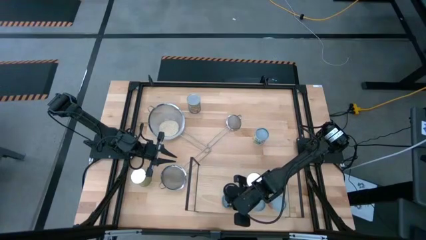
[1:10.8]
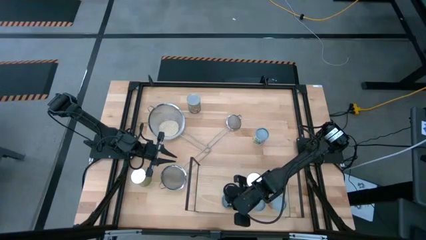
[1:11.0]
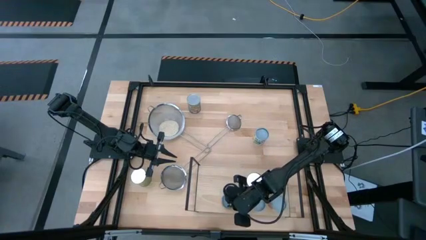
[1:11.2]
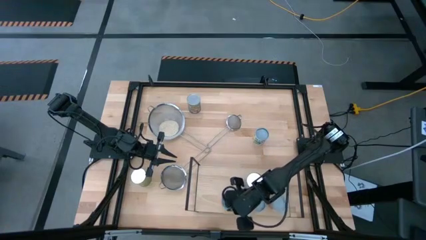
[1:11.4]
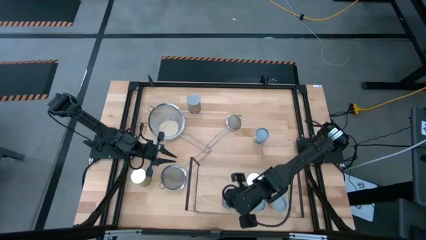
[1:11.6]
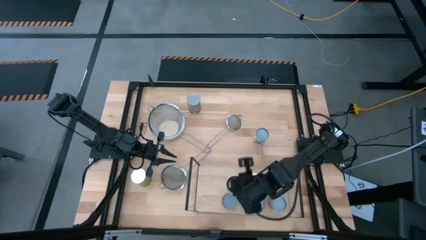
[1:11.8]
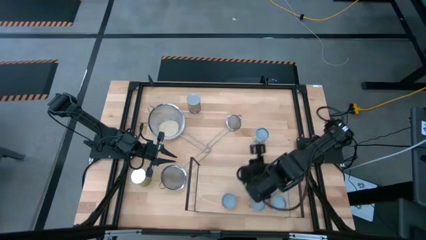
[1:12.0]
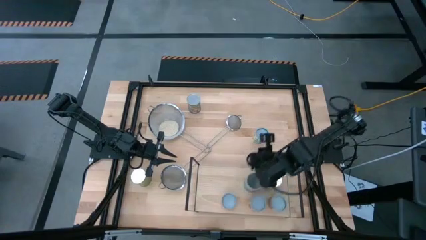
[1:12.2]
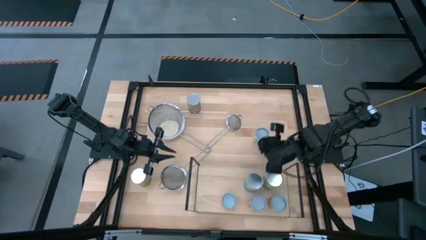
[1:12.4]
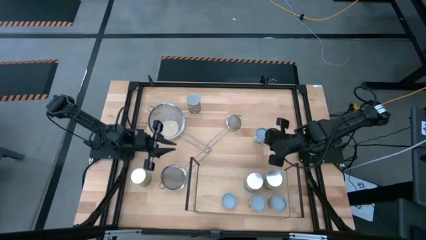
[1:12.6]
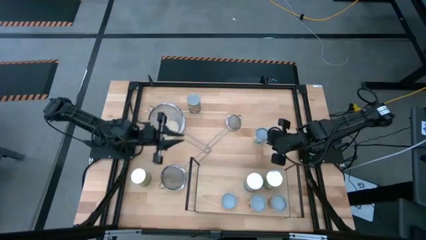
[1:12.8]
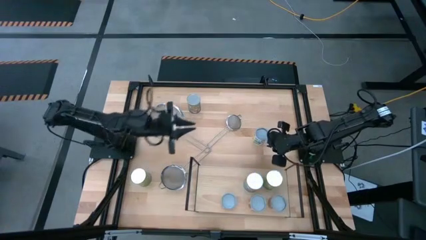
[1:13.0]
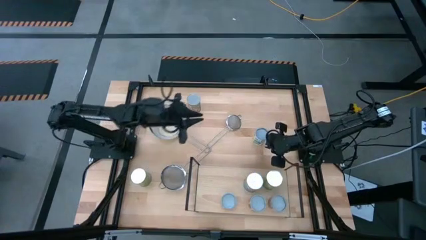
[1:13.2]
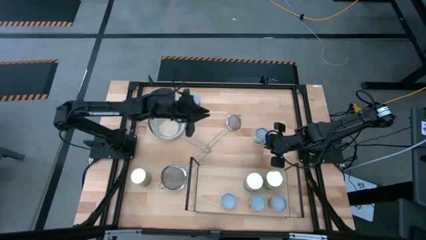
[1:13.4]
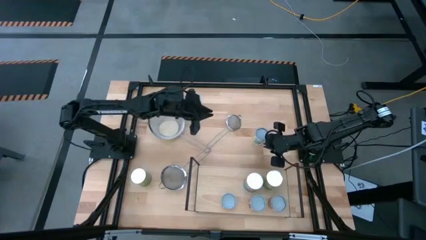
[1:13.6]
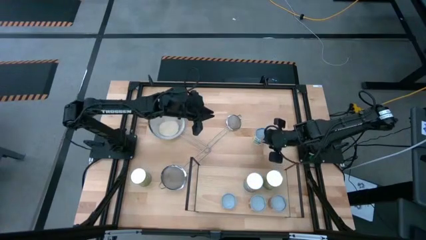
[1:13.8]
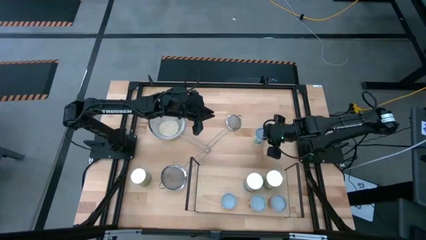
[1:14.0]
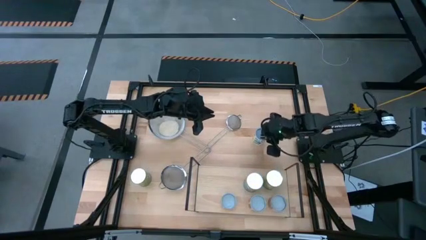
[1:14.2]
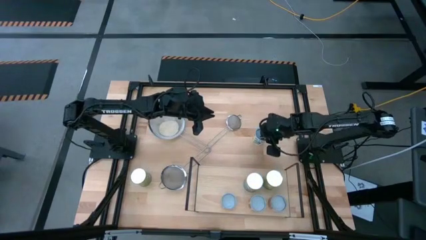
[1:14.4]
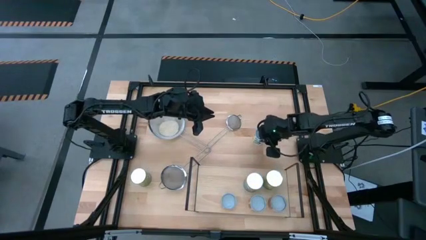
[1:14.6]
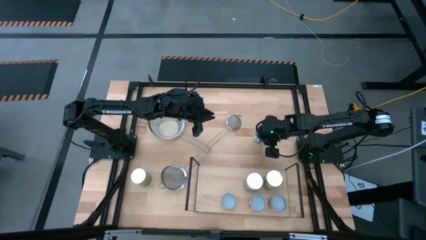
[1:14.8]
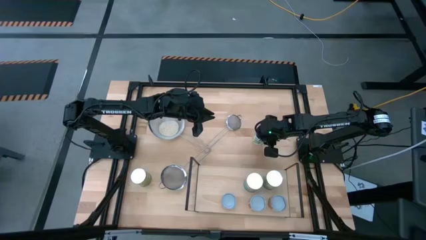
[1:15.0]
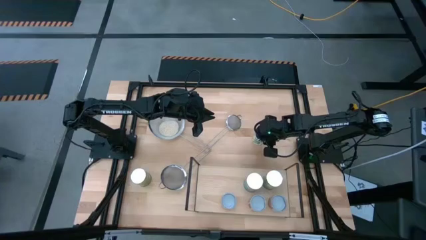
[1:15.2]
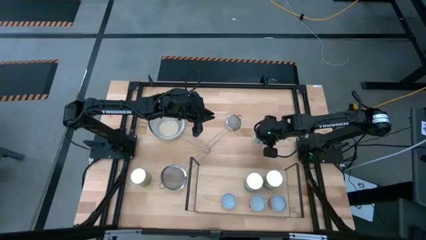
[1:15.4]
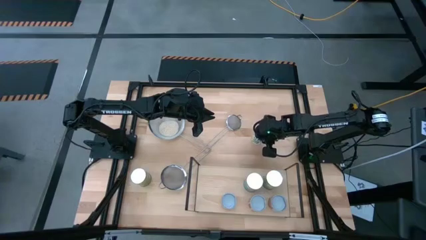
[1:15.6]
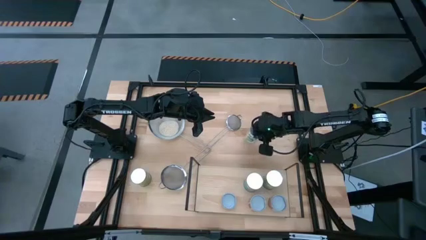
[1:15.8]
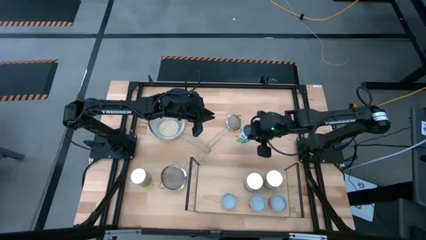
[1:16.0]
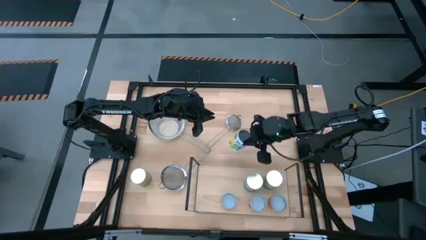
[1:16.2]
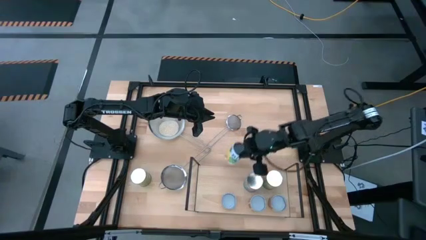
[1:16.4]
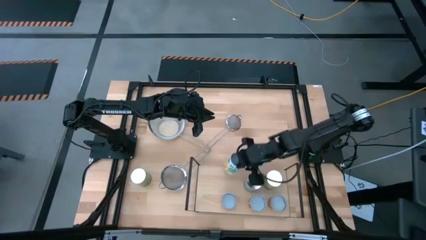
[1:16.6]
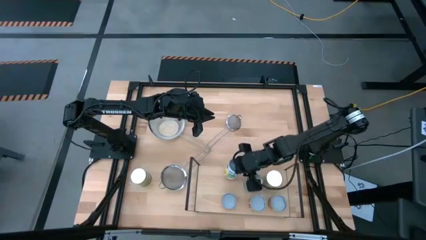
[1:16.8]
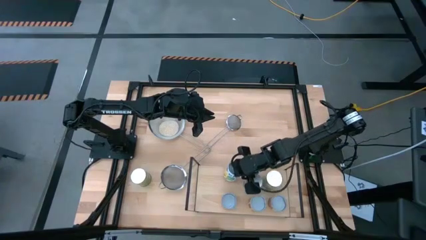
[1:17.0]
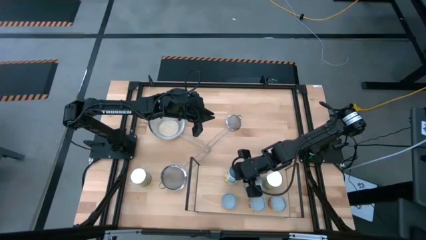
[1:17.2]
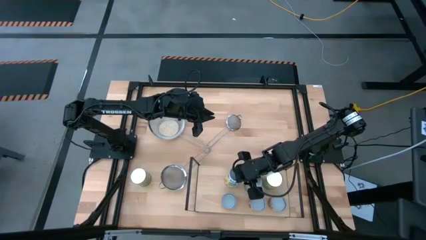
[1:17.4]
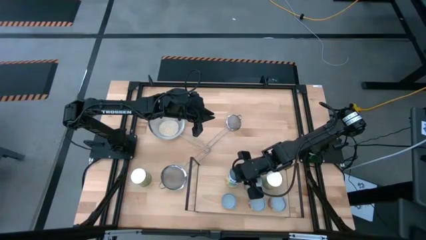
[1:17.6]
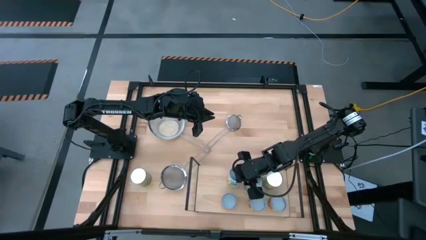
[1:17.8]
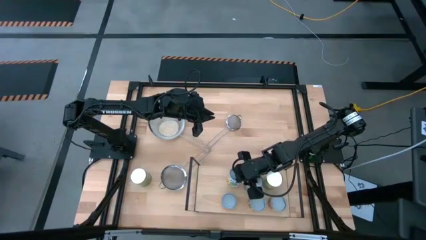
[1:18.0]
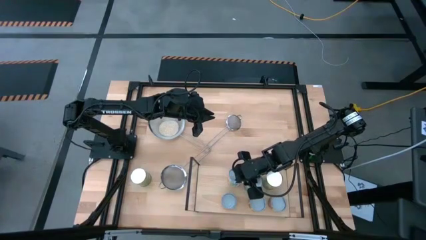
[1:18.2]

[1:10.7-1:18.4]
Task: Pick and place cans onto a shelf
Put the canned mixed fruits on the shelf

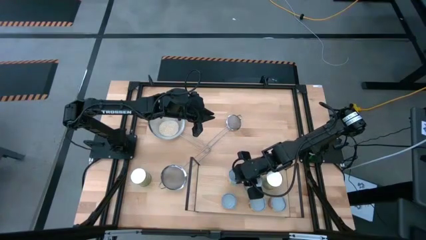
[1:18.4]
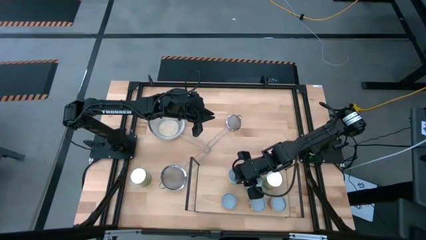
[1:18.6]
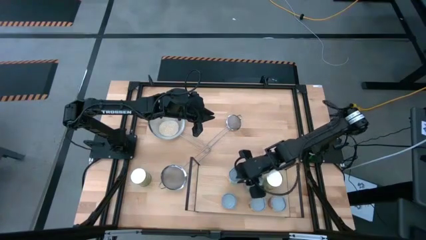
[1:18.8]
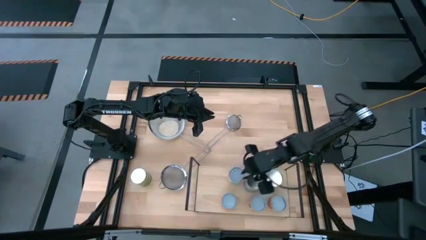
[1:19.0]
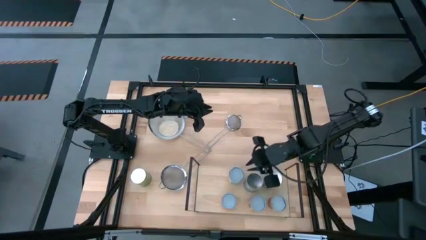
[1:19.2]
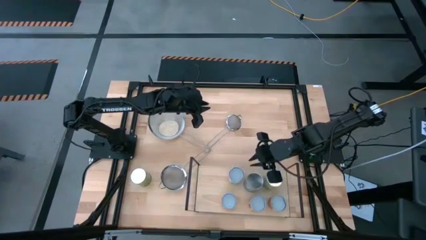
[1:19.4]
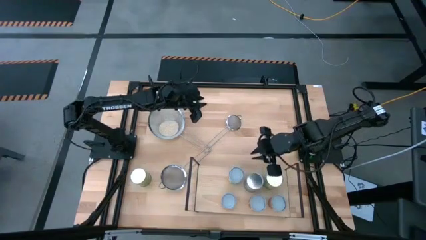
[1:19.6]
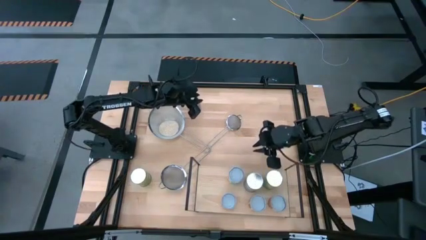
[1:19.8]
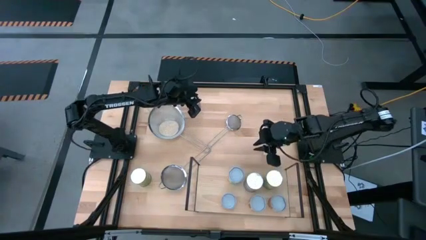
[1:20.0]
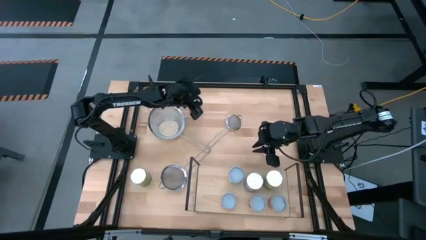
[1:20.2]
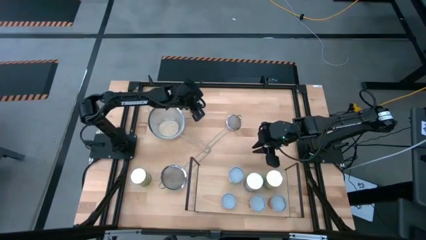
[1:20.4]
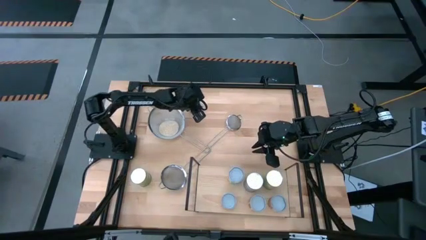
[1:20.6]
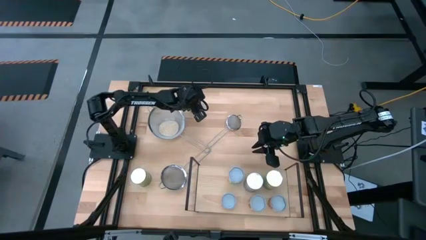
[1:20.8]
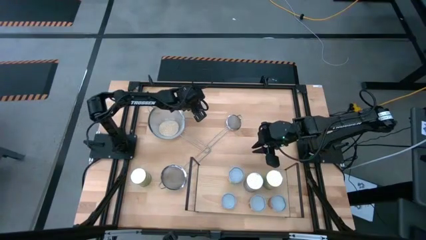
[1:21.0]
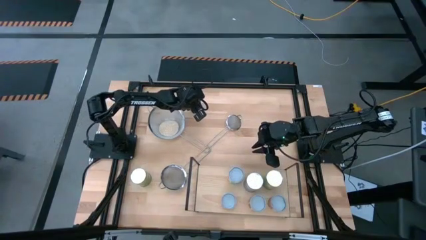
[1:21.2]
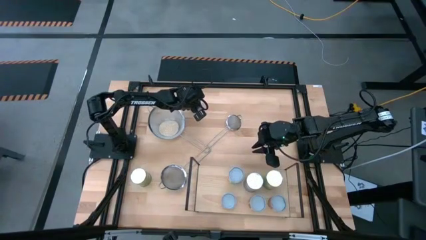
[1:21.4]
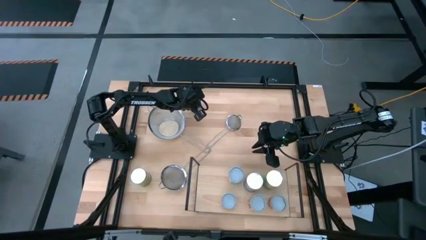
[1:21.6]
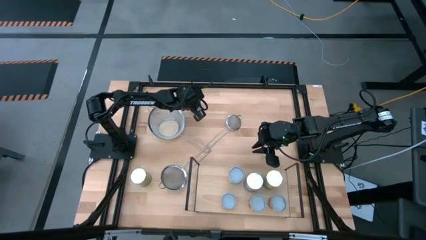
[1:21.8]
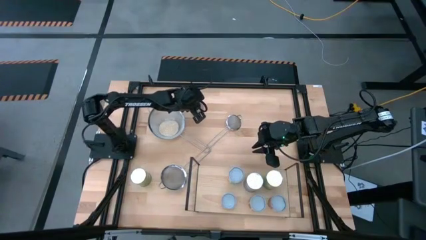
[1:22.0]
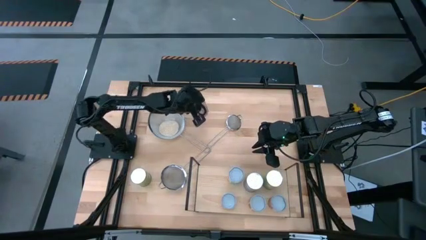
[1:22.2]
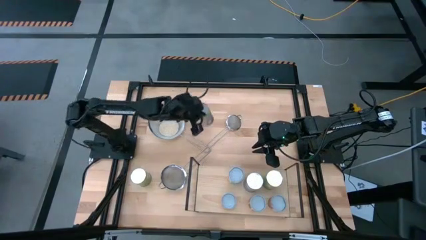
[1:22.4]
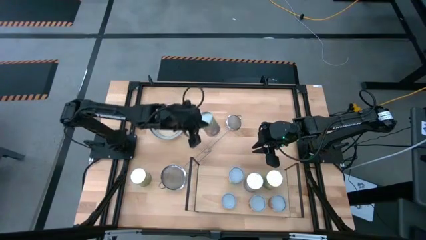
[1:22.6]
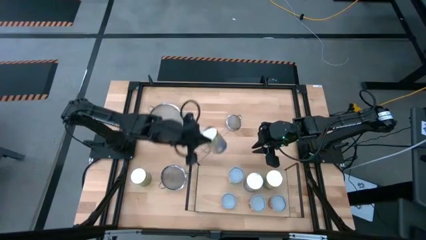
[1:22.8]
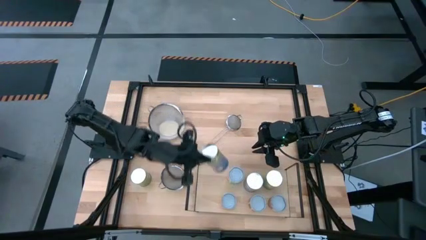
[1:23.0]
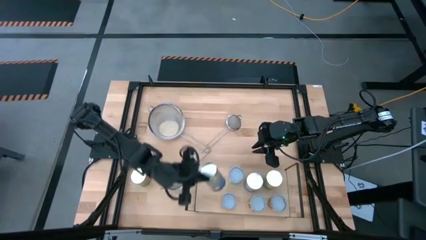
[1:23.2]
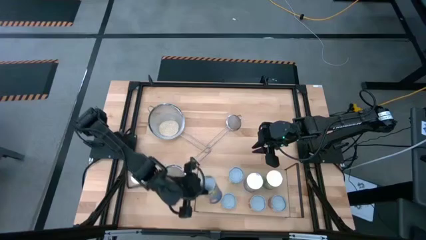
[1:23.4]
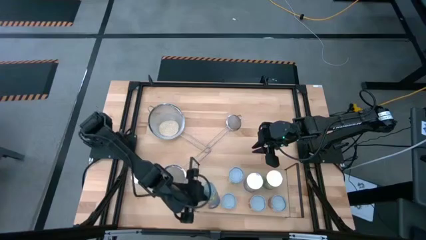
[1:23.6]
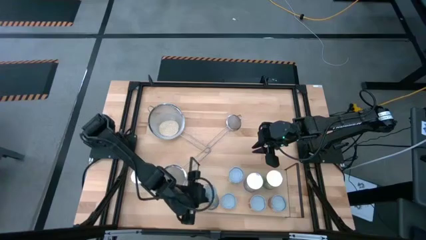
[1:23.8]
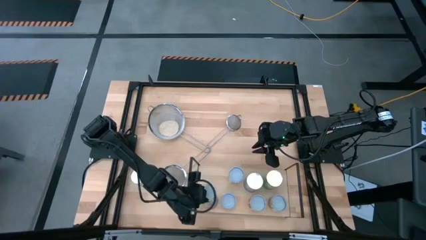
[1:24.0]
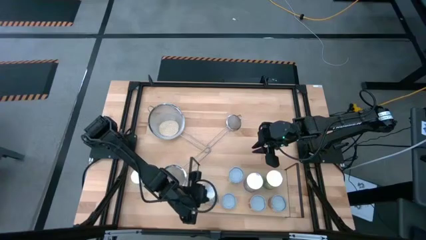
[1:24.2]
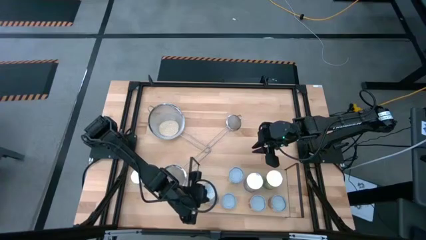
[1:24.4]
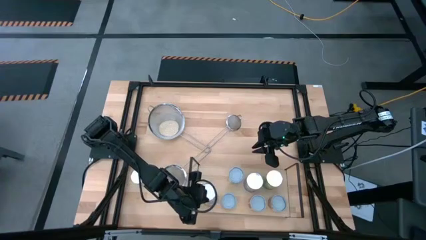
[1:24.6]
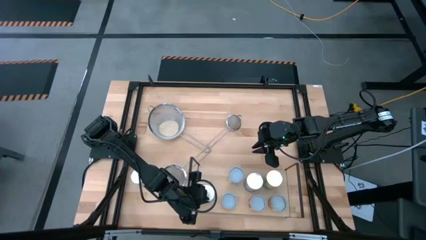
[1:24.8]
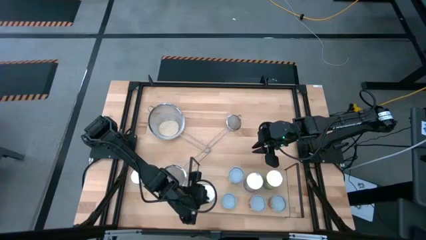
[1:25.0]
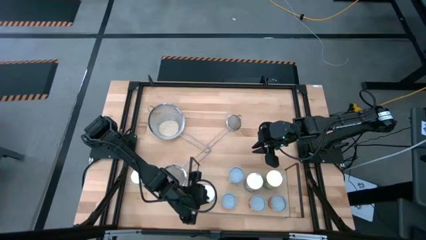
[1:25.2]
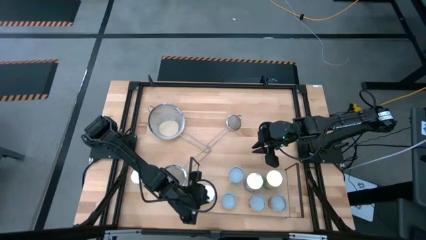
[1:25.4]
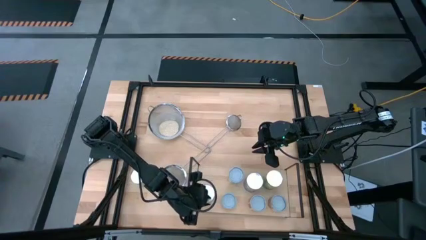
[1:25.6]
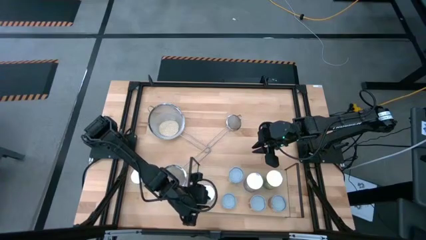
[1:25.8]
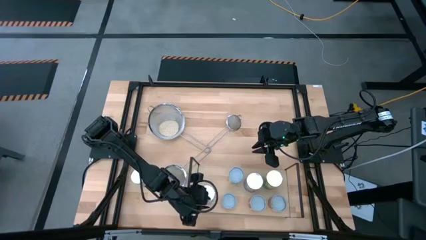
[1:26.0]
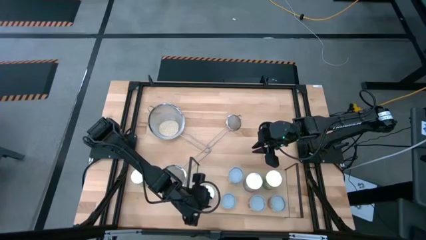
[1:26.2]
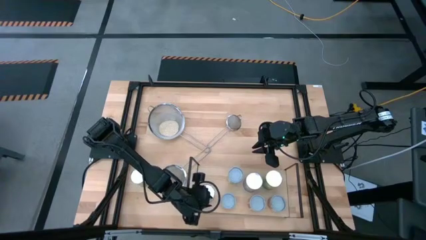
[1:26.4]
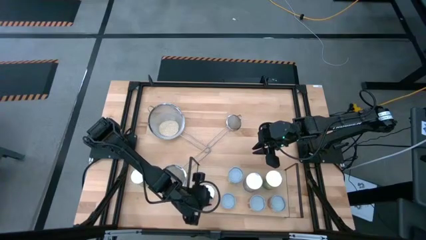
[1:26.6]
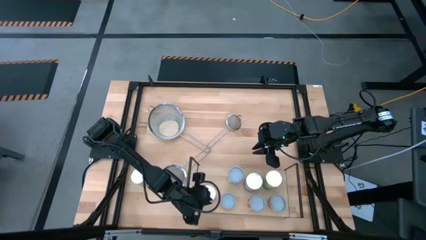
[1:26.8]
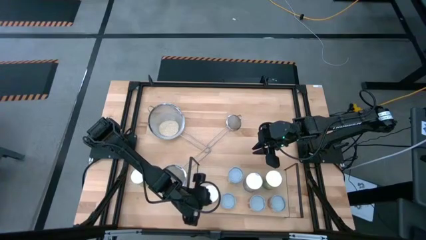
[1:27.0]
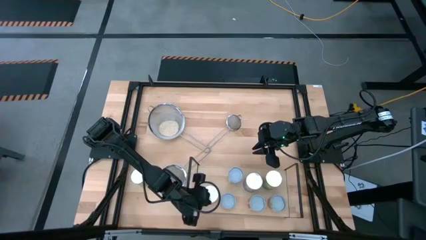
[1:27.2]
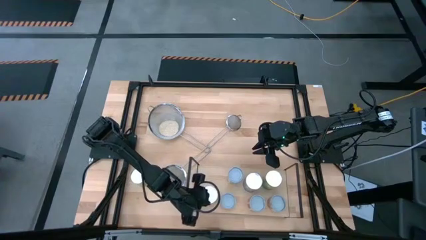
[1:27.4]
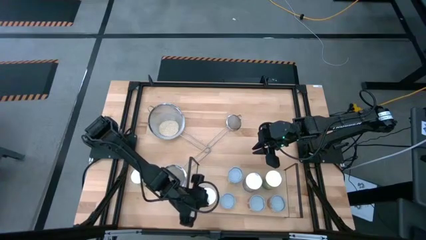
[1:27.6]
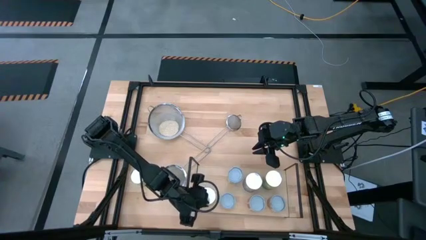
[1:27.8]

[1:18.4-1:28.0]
Put the top canned peaches on the shelf
